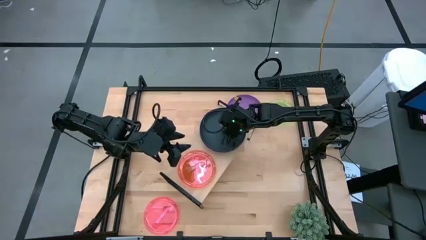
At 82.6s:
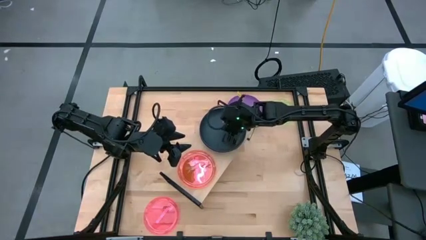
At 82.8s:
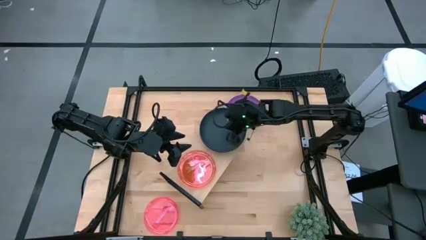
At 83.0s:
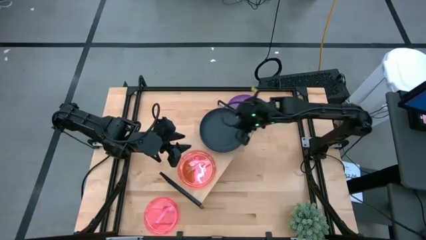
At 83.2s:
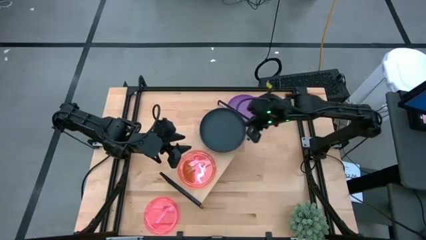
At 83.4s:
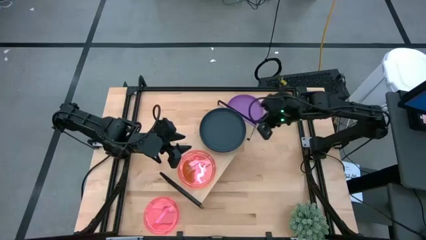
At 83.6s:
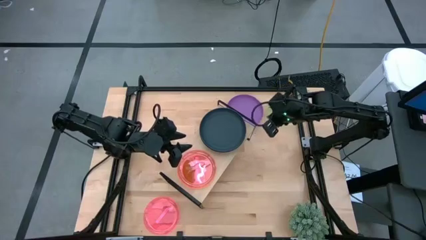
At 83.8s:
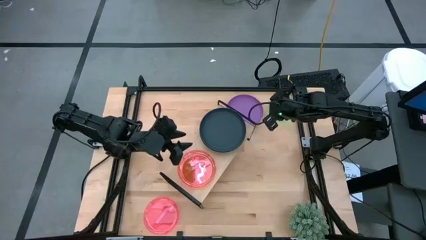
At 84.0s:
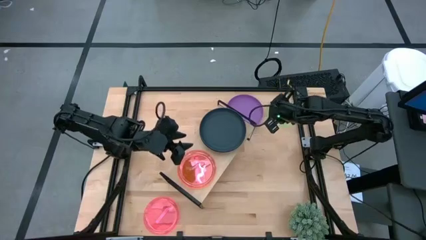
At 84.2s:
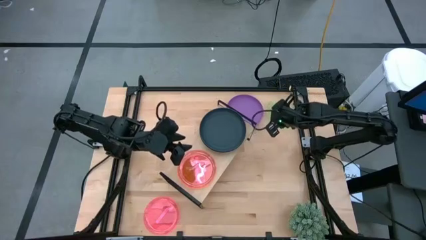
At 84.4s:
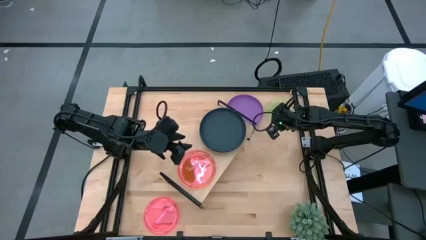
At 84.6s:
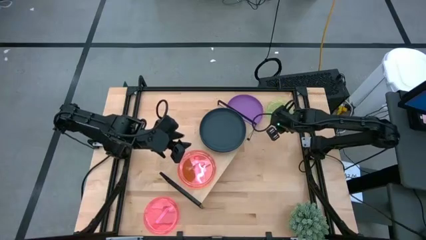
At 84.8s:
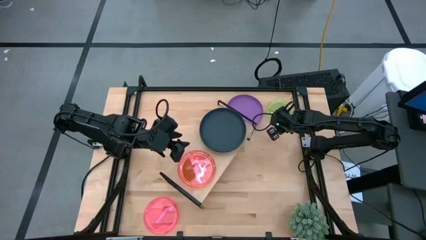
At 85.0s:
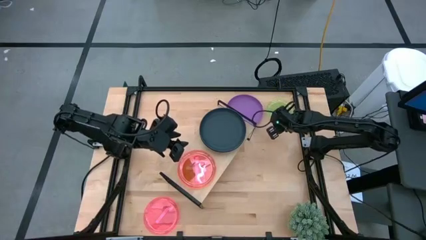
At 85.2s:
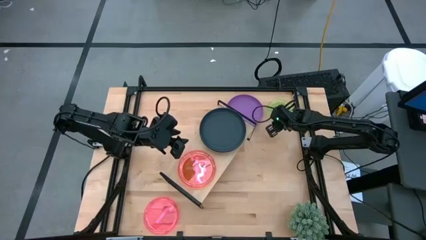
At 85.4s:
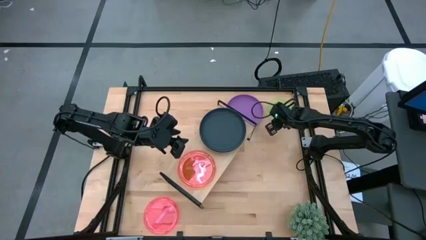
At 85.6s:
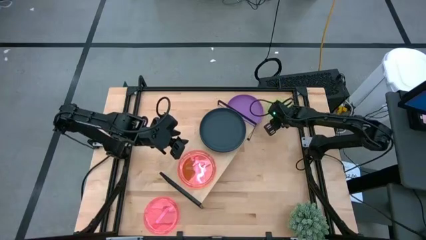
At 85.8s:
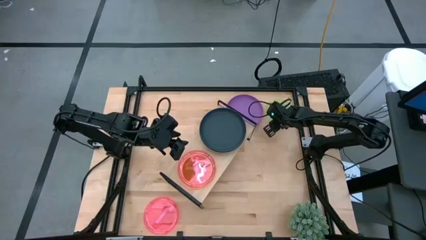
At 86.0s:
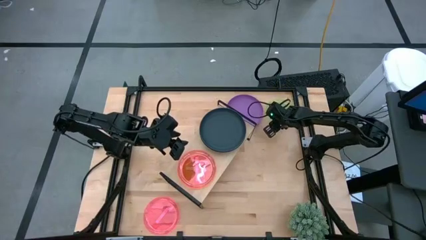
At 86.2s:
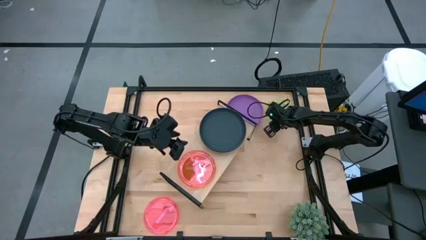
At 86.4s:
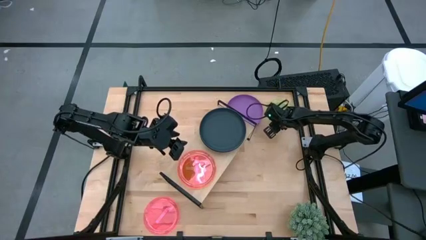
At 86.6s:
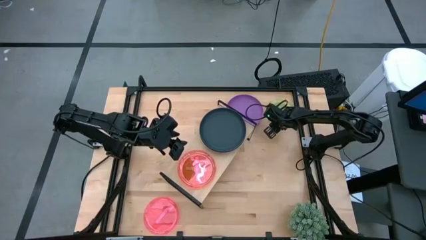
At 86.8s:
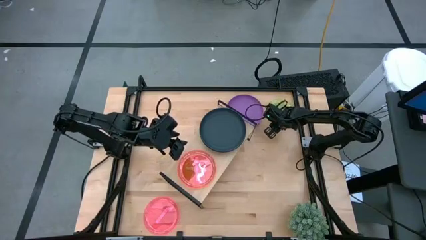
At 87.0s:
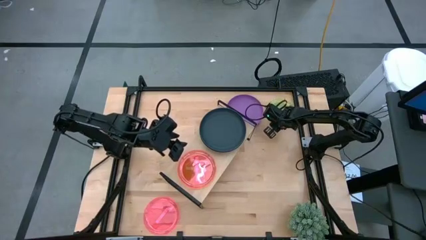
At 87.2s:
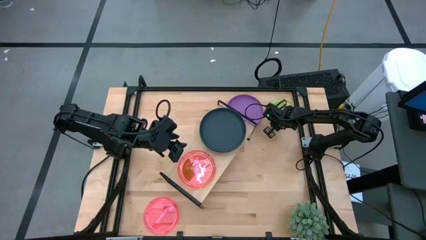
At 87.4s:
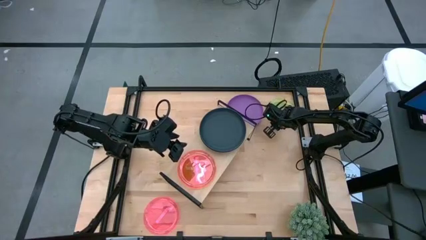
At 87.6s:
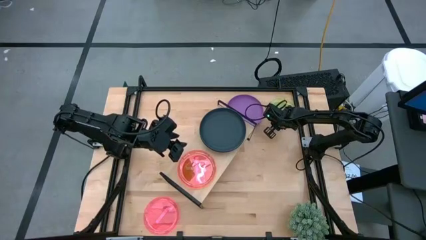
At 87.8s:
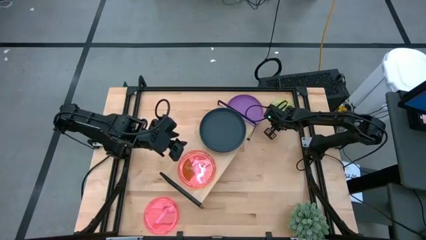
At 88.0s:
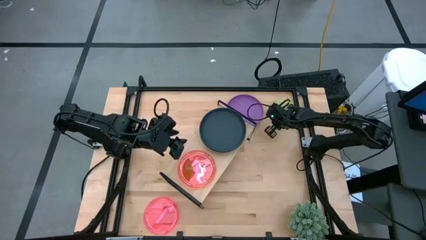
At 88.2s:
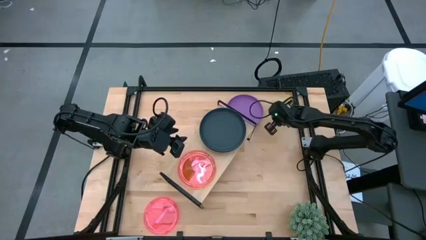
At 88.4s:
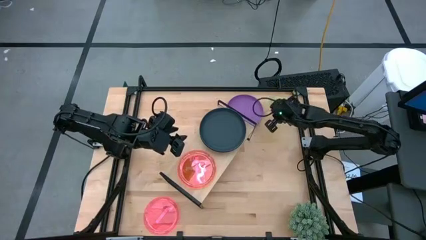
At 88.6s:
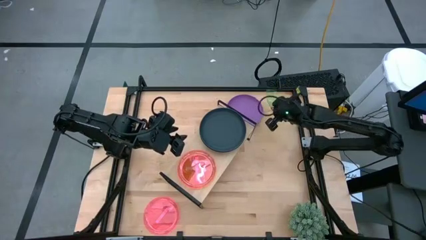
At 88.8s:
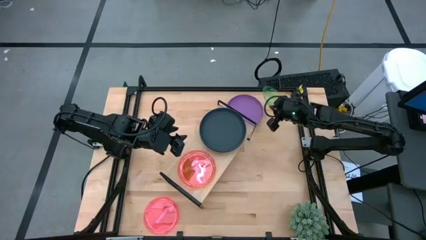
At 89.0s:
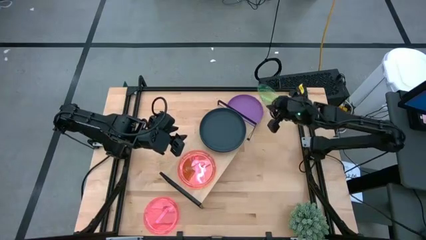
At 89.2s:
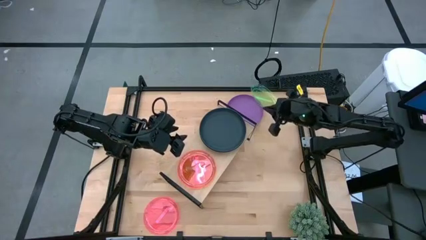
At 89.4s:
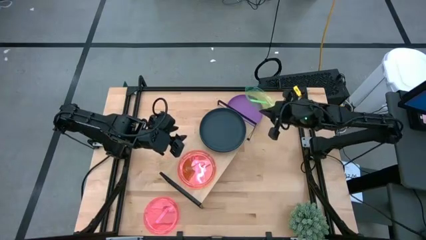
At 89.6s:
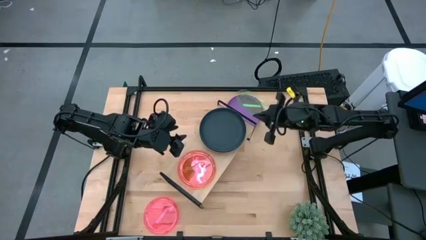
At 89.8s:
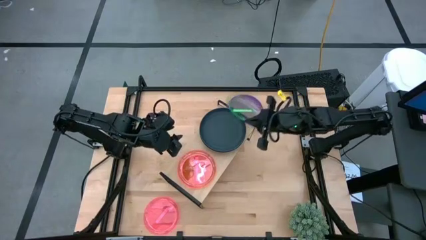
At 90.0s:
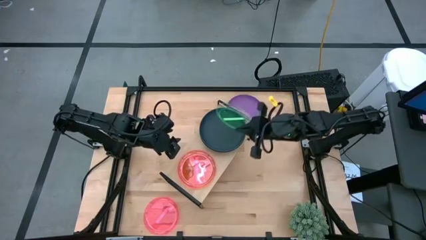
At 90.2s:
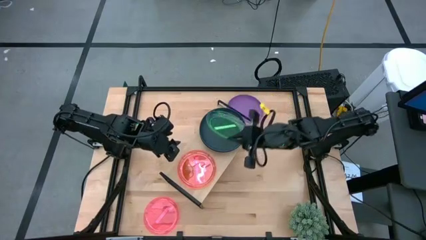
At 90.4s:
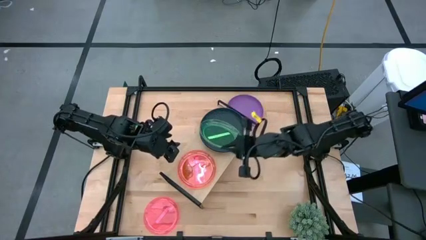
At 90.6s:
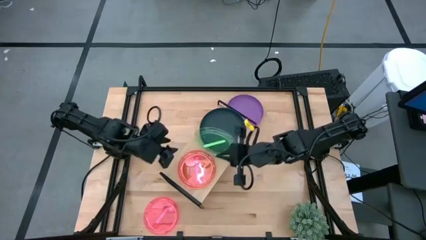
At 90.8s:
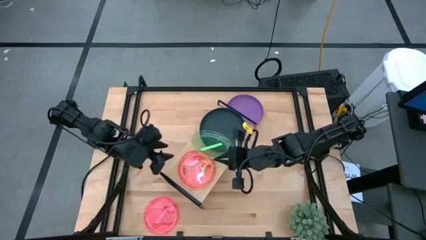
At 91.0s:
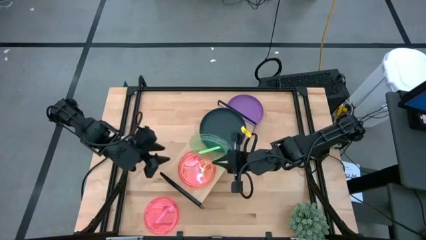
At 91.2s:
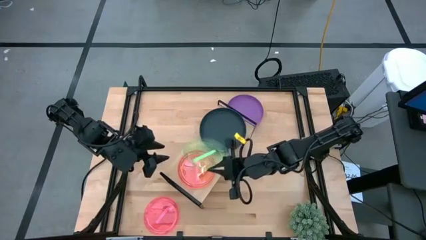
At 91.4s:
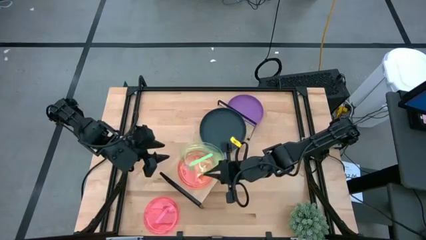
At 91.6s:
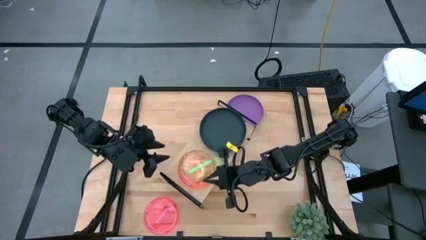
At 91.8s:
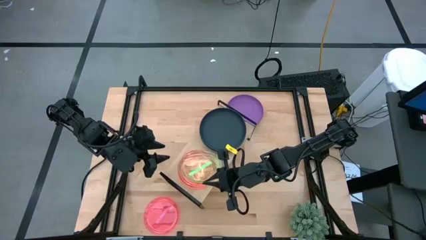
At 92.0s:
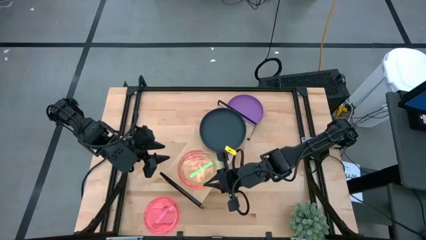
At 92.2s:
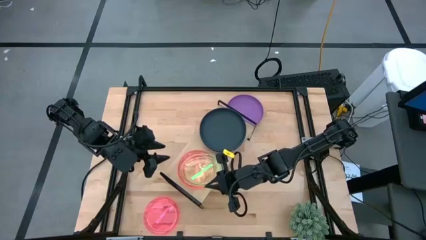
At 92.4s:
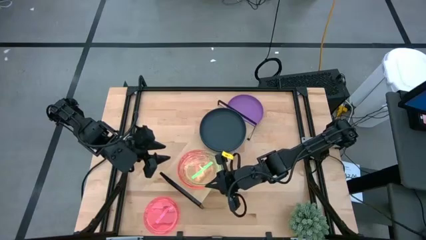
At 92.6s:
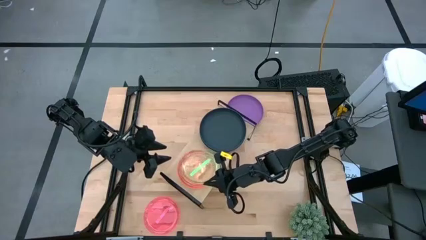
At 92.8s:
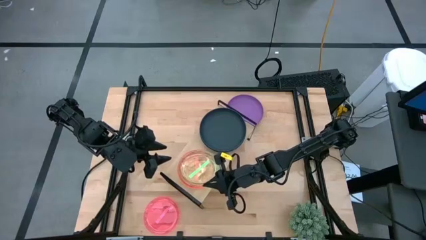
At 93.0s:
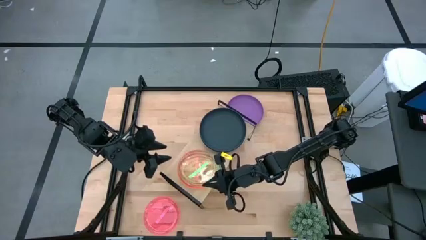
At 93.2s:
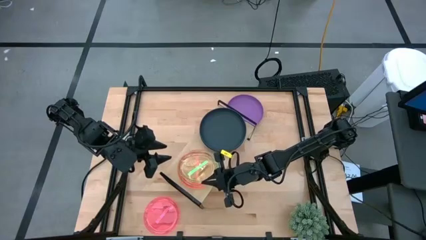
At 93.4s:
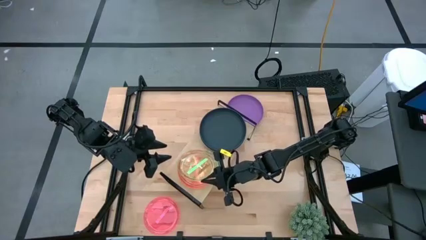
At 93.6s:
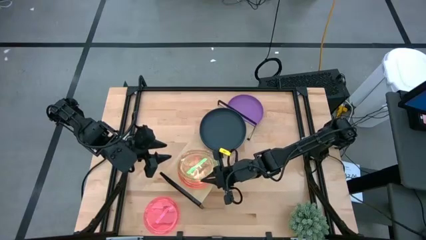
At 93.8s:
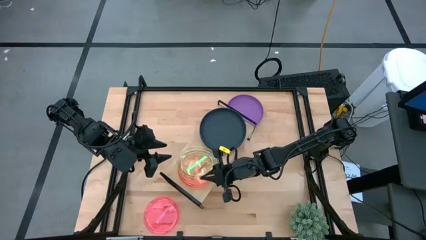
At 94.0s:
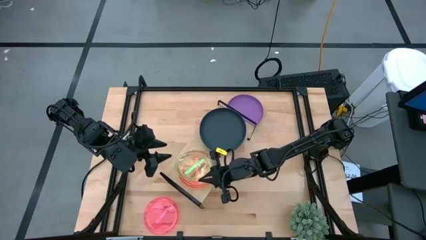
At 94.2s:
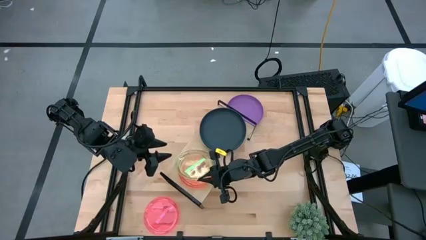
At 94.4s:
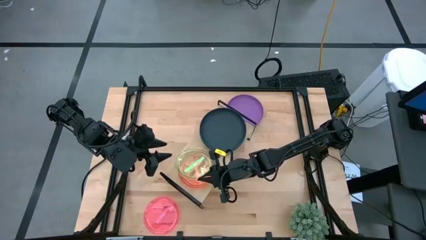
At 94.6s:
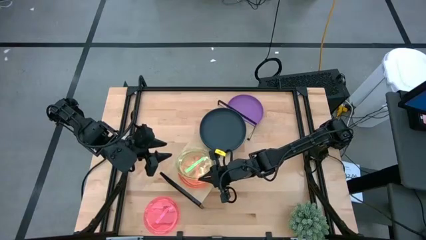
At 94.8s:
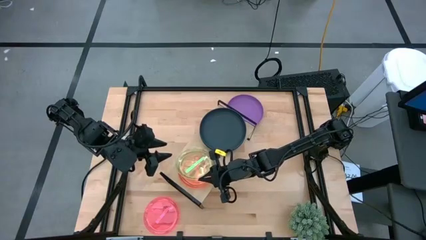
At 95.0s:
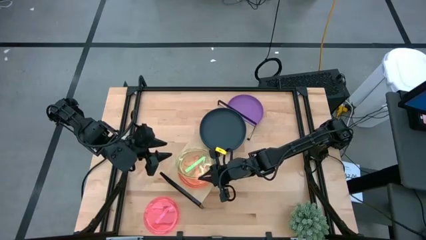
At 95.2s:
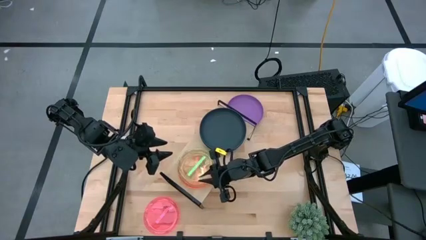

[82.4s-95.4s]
Task: Place and stack plates onto a shelf
Stack the green plate on top of the pink plate on the shelf

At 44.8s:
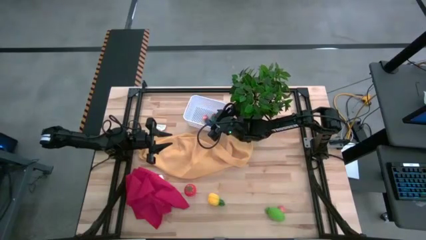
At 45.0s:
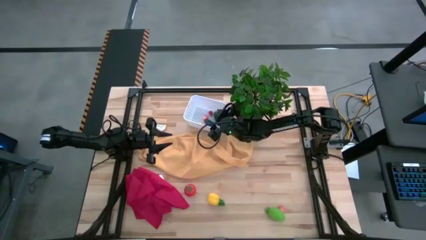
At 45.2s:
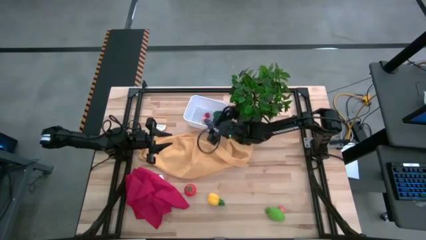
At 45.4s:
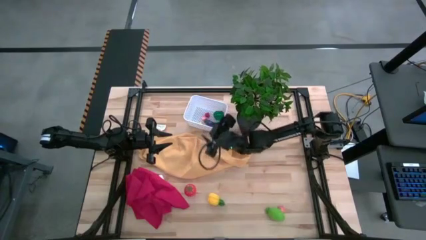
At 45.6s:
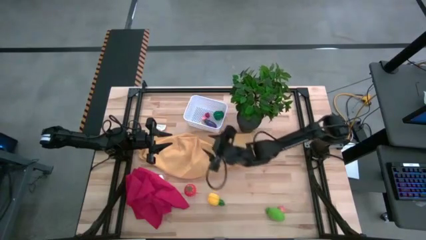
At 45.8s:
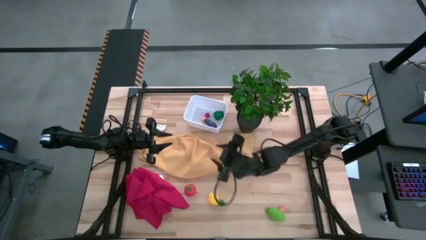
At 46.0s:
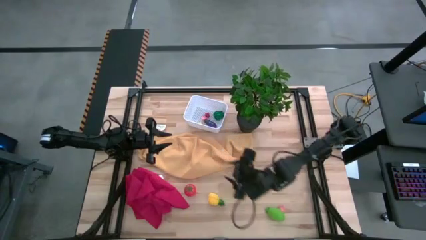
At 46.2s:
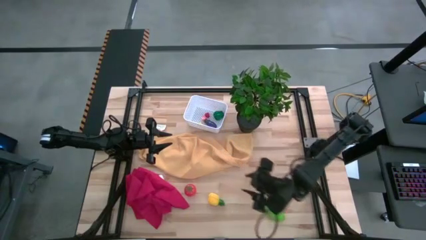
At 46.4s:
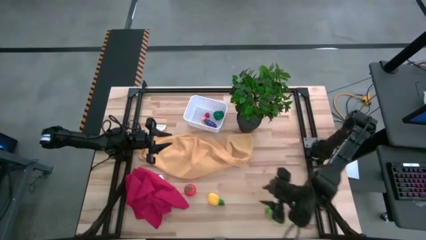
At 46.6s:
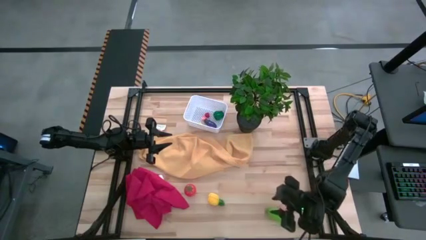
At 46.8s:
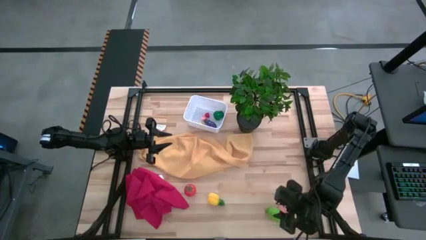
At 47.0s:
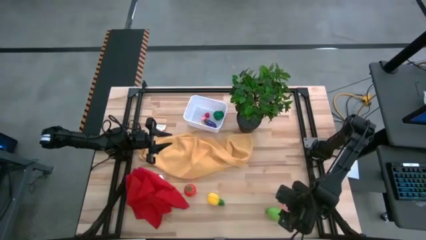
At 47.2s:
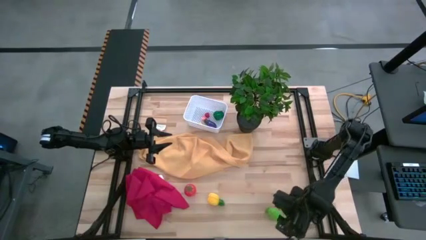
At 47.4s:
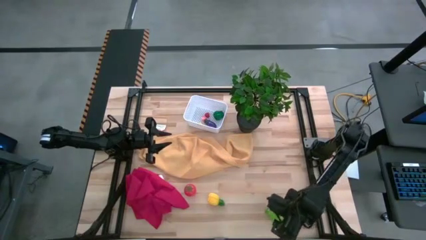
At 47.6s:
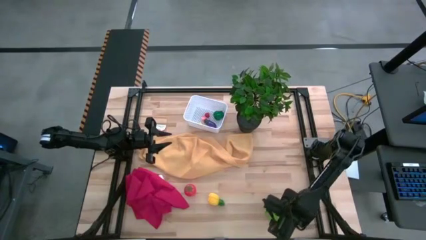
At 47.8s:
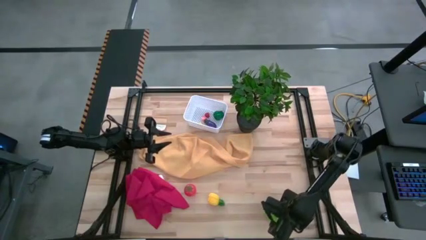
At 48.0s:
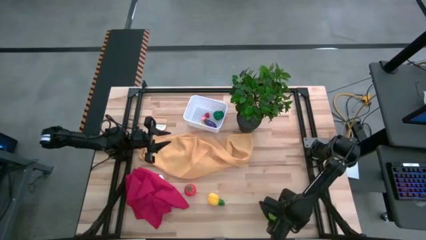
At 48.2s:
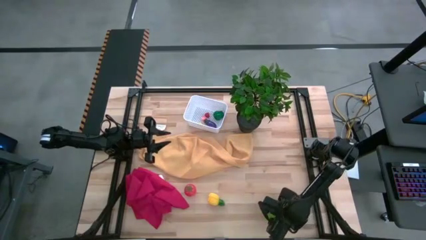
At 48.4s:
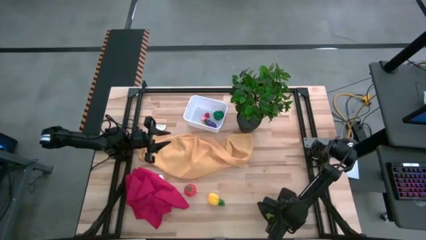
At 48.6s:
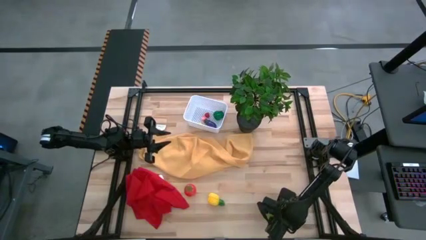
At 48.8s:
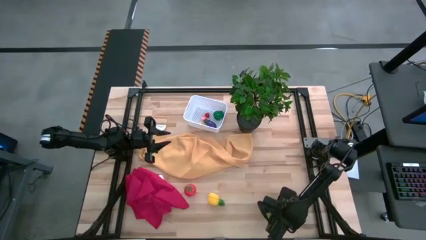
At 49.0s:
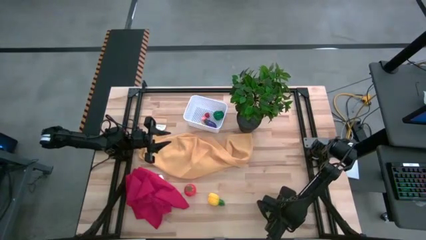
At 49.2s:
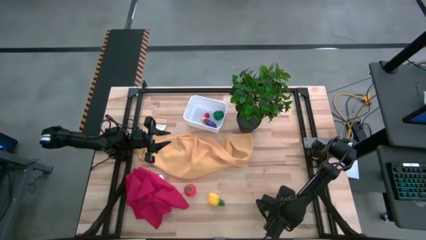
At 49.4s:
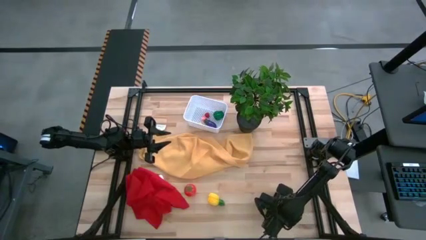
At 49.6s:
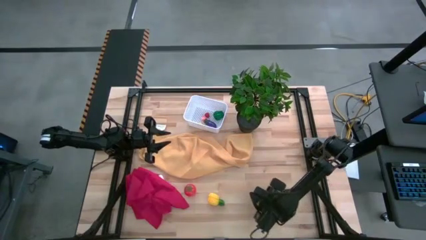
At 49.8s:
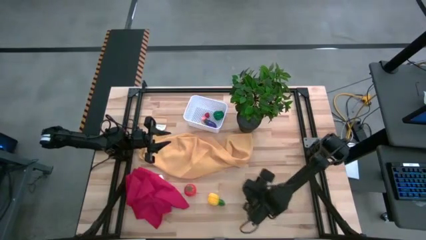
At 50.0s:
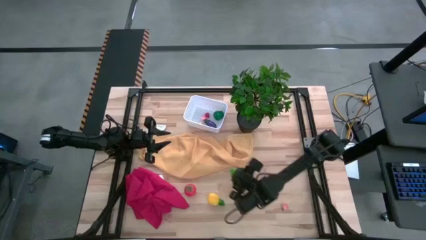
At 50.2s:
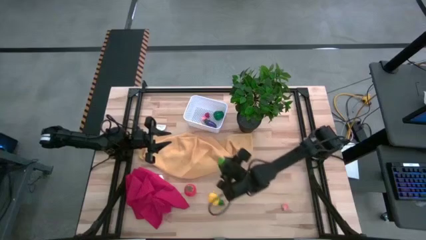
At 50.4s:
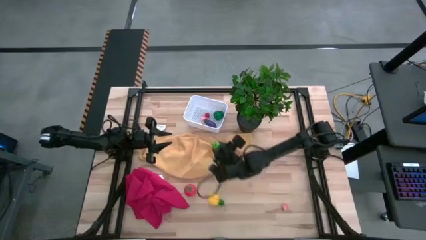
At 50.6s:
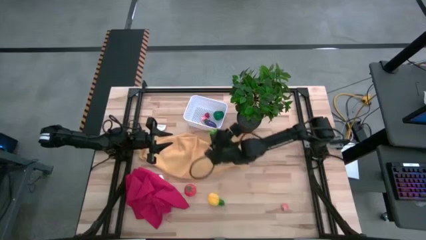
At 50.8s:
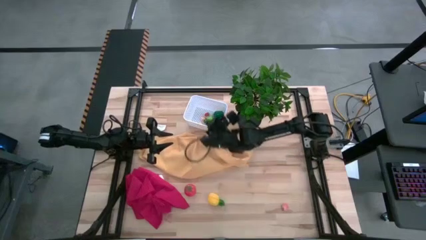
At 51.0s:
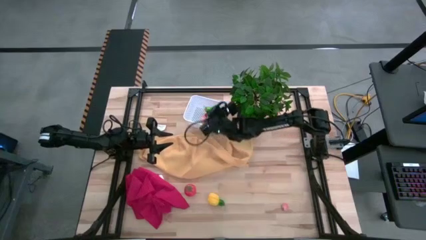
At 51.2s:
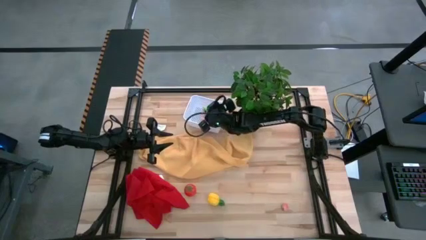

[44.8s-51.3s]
Task: Pick and placing Produce into tupperware
Put the green cabbage into the white bin
